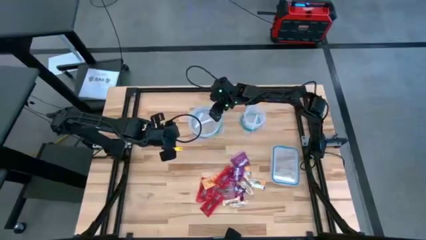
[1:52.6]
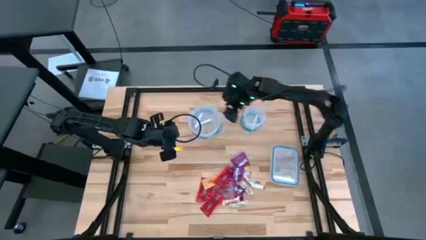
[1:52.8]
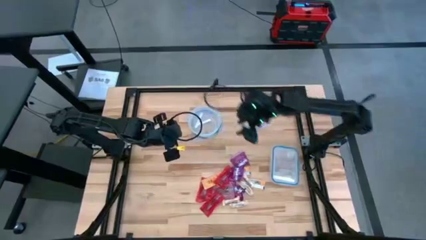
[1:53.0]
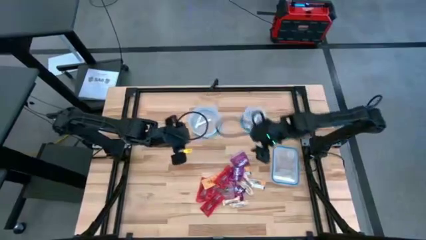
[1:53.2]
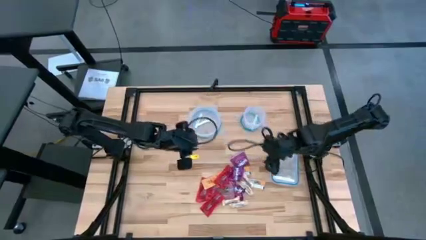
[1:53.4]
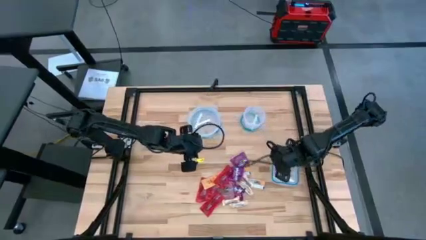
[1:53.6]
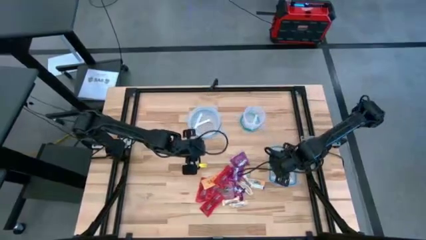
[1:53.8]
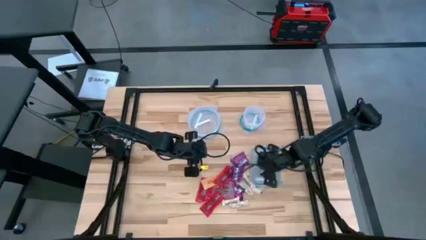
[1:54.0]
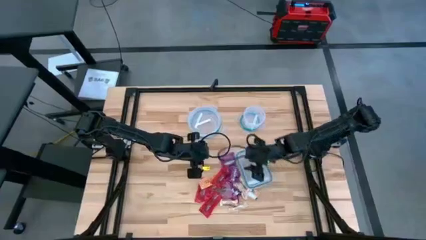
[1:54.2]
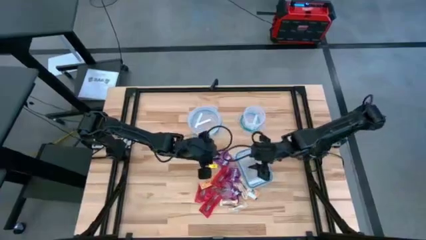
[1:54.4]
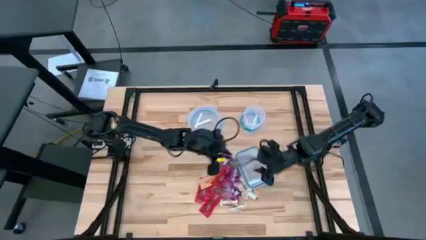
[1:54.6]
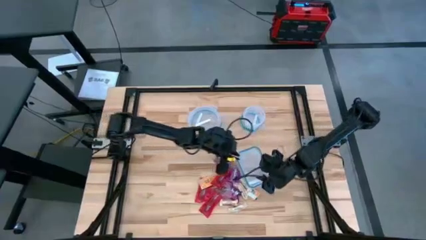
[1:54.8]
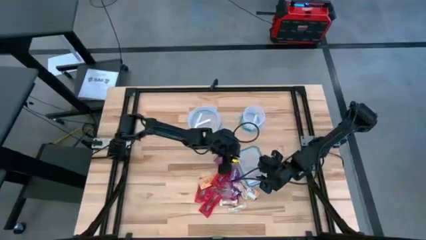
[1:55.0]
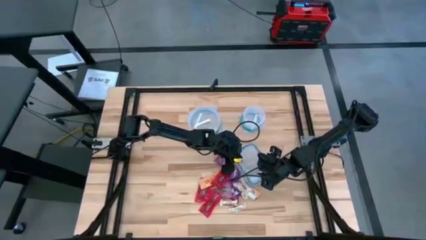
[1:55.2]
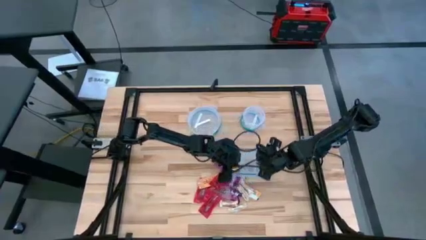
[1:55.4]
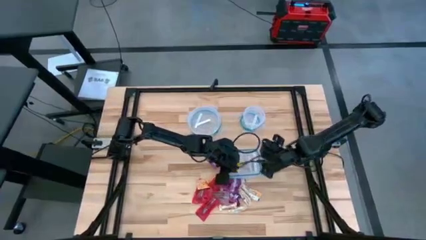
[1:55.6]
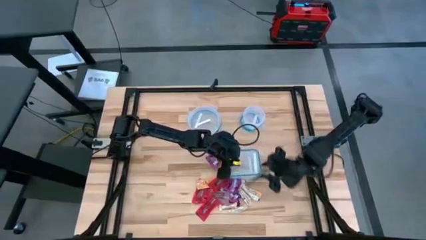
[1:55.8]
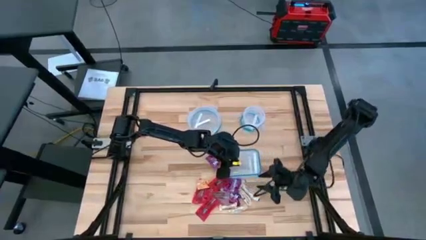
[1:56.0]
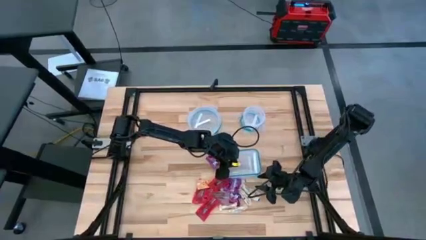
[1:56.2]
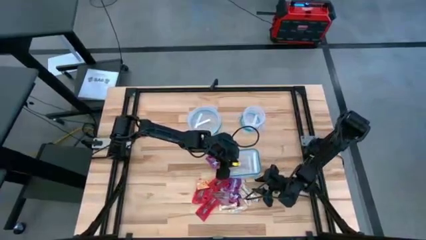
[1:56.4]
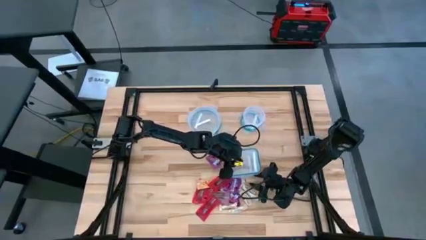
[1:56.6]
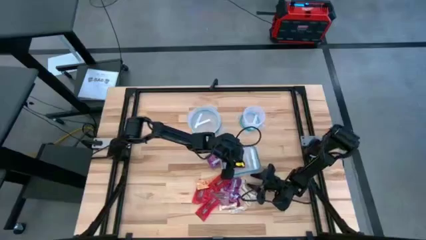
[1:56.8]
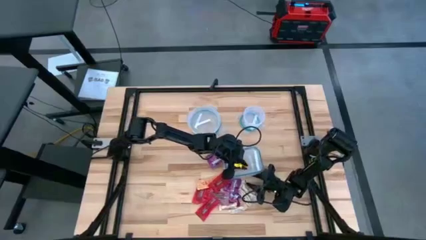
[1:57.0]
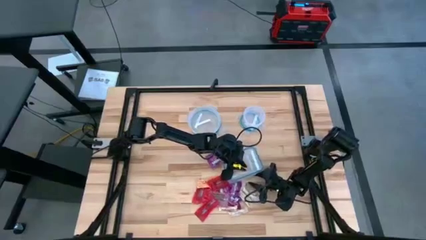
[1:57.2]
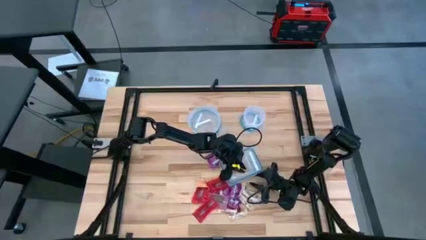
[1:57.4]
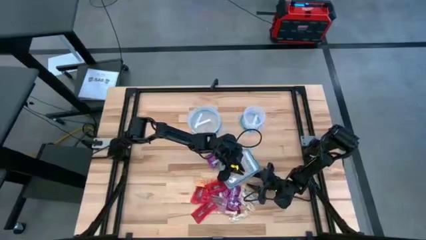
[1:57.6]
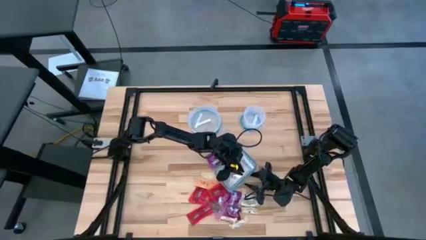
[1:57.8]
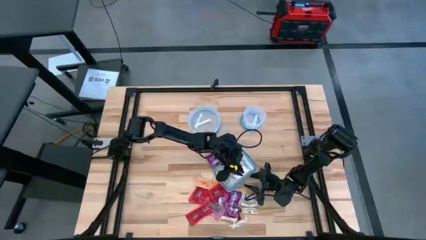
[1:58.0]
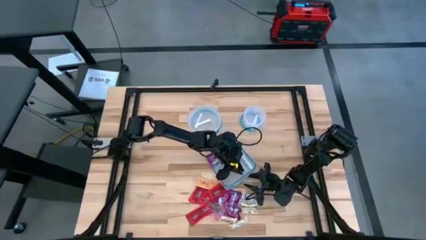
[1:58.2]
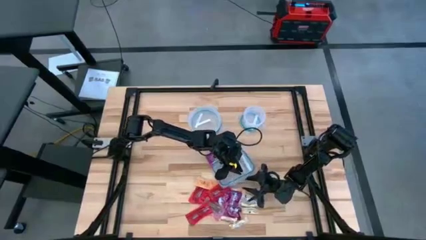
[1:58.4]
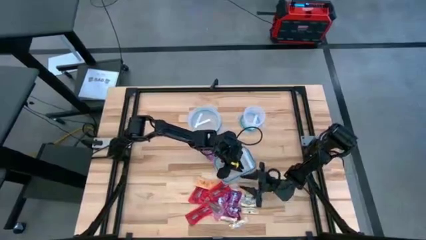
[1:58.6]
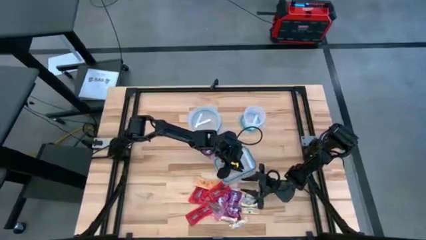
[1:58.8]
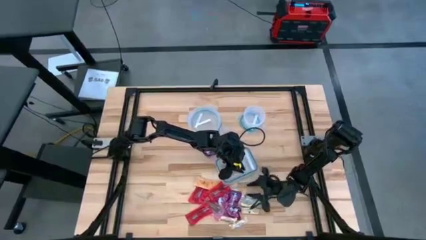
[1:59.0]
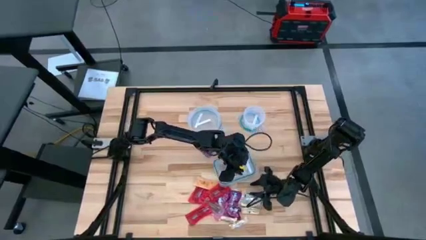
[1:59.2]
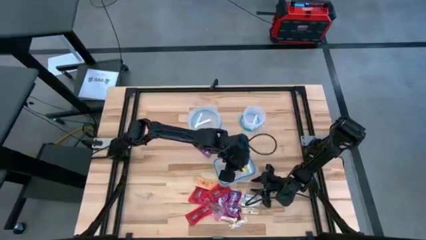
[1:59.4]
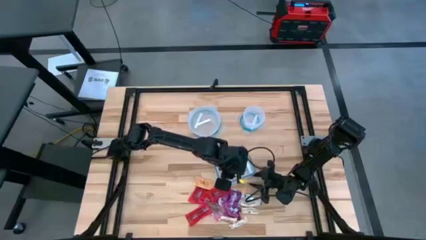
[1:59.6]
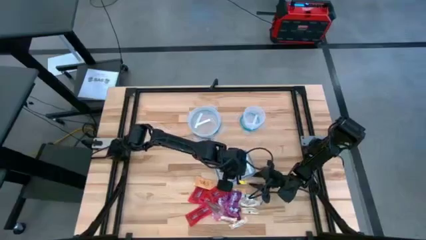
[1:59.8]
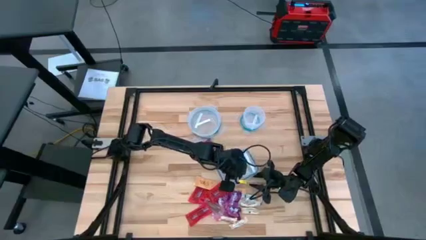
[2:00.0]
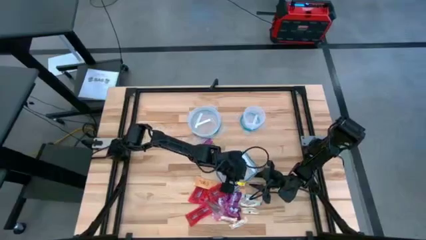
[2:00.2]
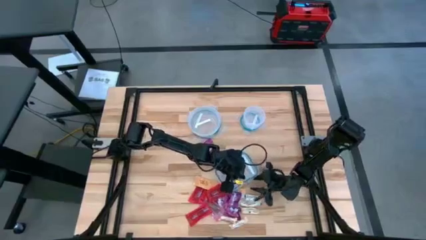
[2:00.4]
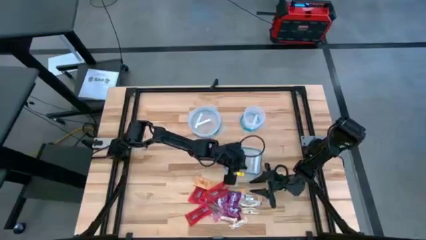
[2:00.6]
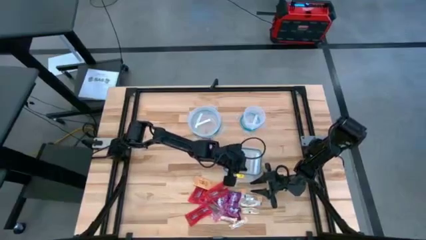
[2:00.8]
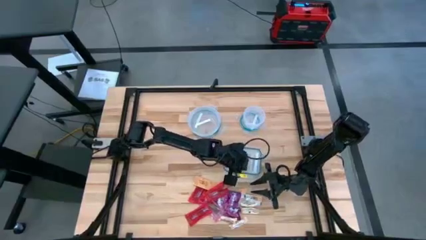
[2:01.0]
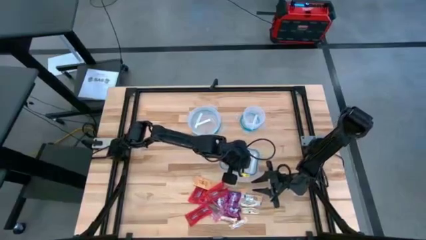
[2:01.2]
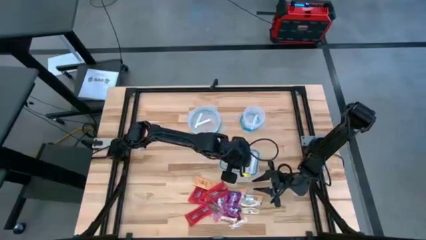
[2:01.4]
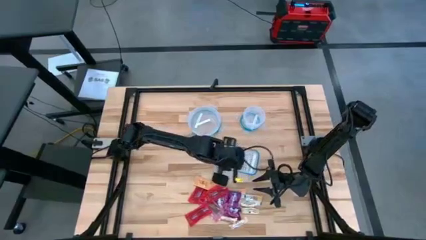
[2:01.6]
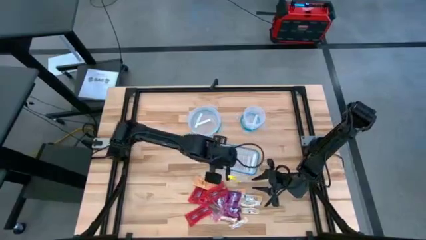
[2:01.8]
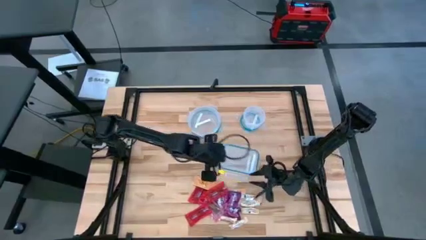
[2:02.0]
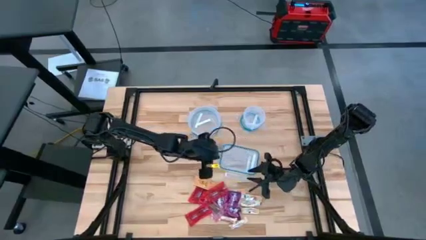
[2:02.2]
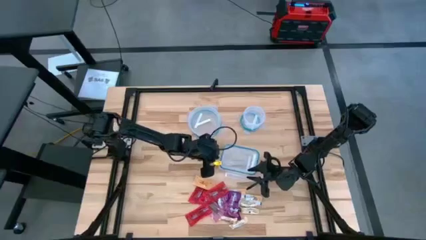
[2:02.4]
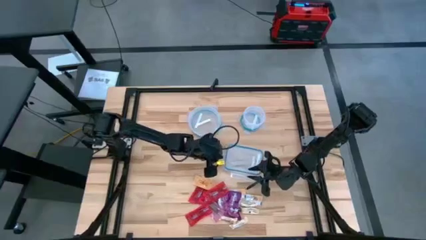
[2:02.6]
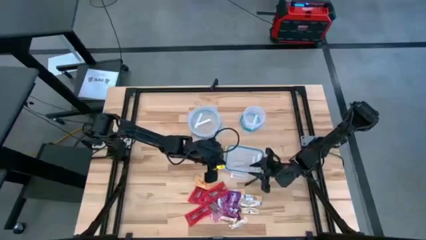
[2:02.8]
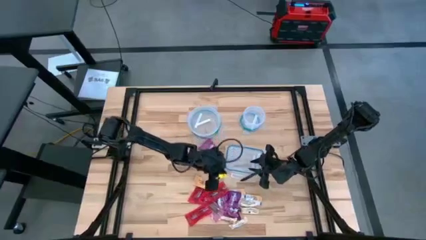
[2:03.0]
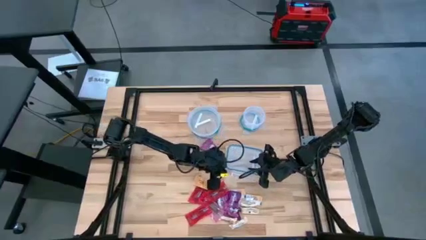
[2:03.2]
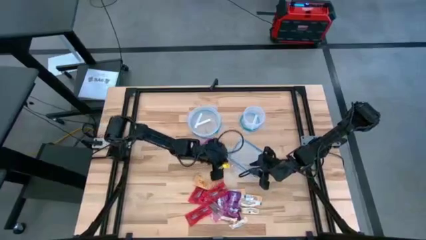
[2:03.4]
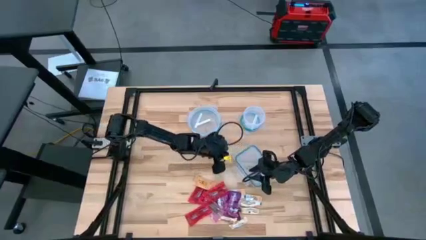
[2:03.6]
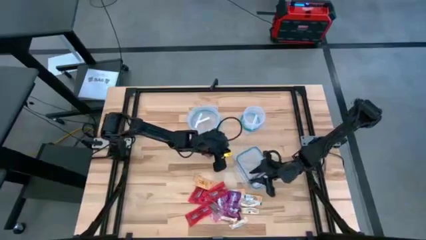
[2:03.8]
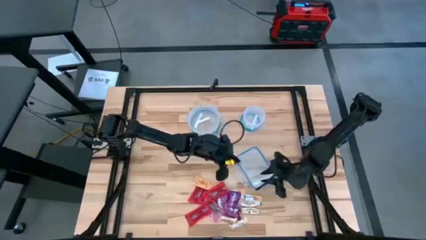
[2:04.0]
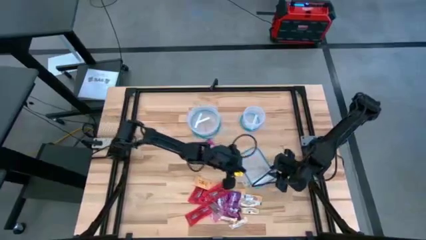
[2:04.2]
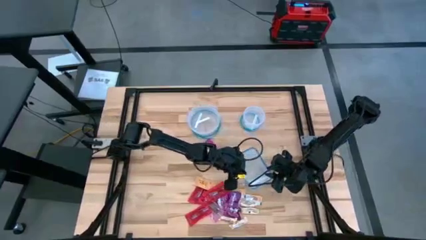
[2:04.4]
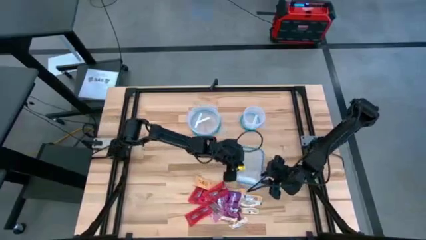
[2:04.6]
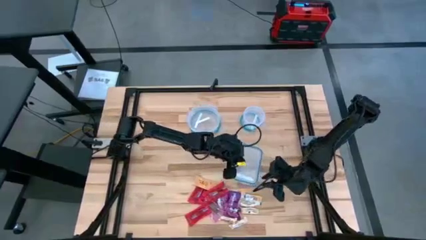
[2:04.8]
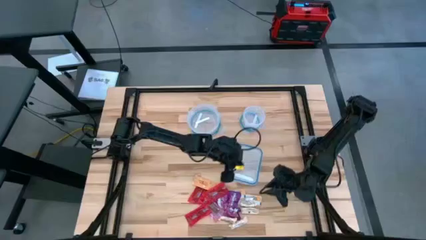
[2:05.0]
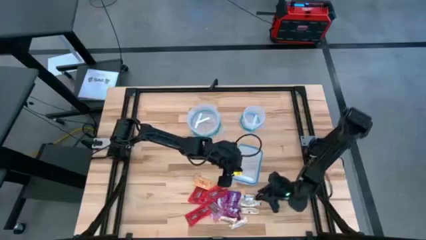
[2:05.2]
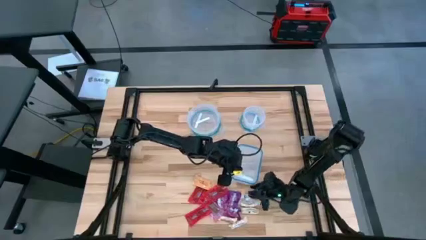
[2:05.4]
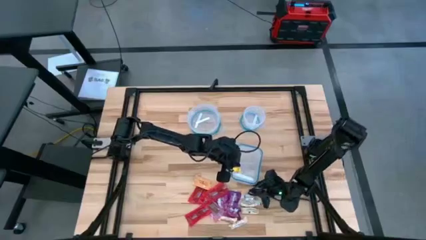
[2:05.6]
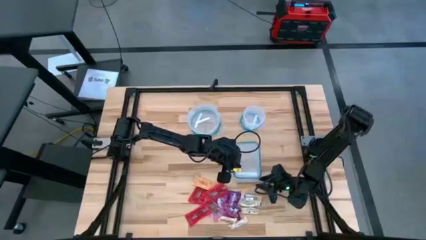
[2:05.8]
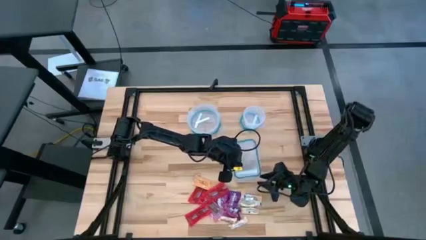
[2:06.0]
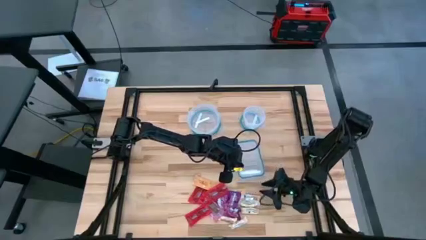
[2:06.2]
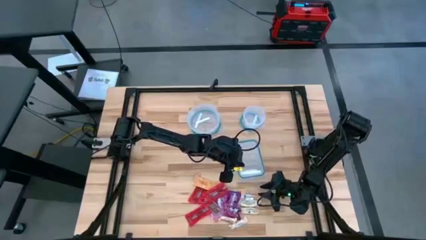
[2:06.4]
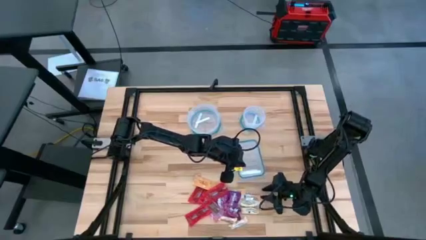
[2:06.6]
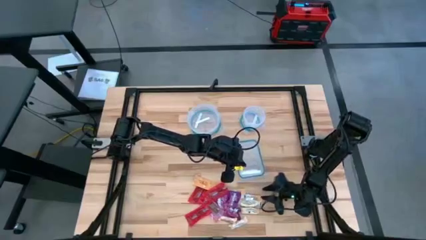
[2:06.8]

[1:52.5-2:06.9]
Task: Sort candy
Open the rectangular transparent bin
